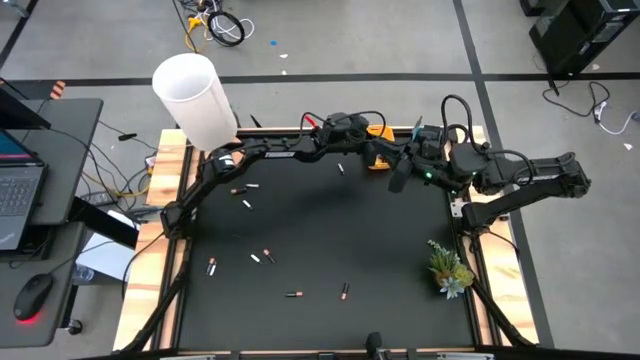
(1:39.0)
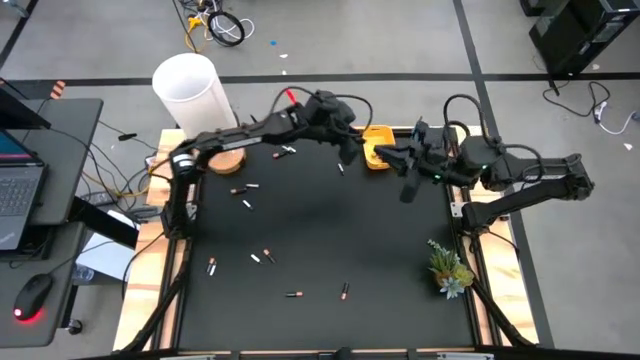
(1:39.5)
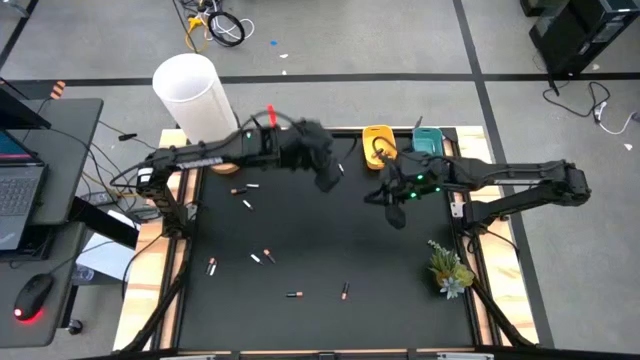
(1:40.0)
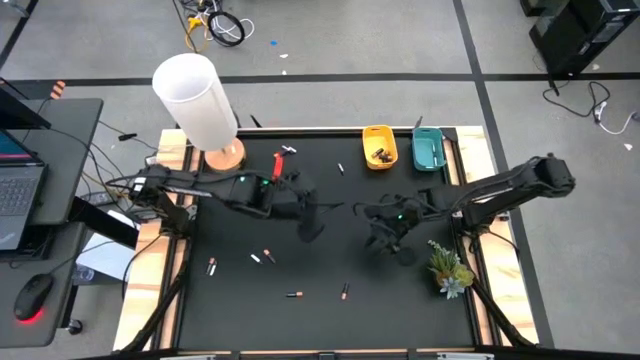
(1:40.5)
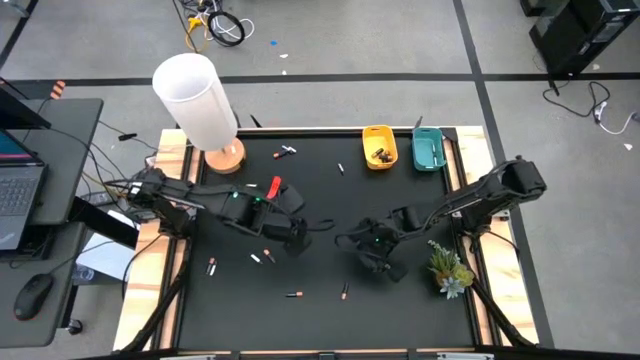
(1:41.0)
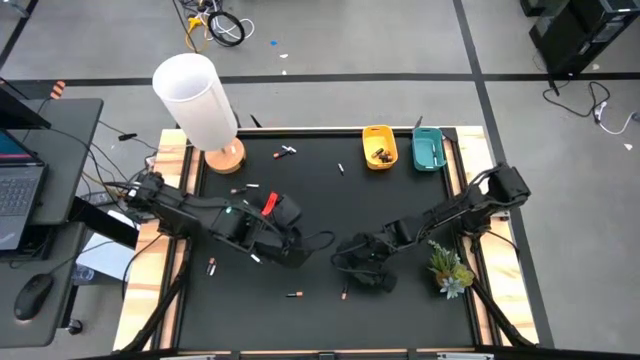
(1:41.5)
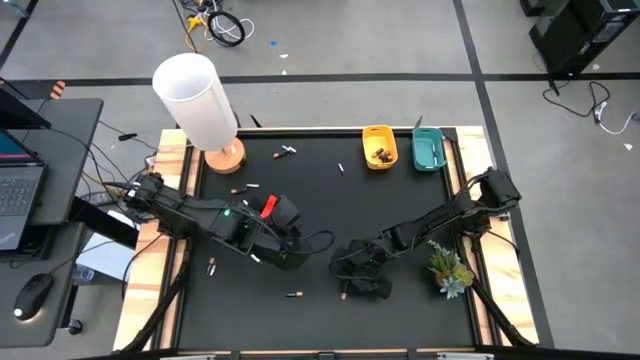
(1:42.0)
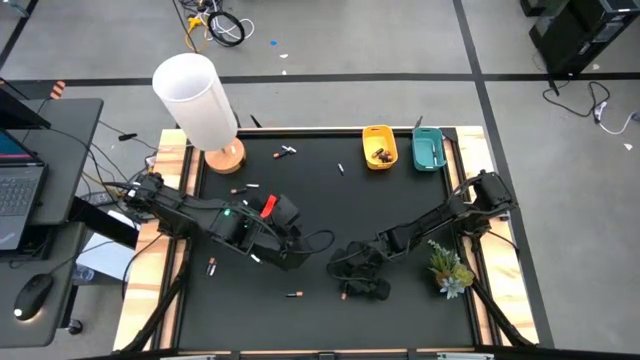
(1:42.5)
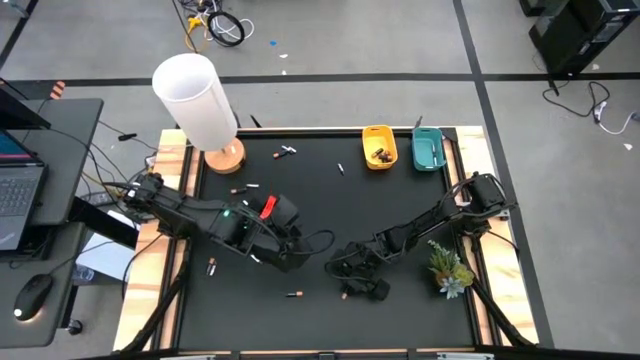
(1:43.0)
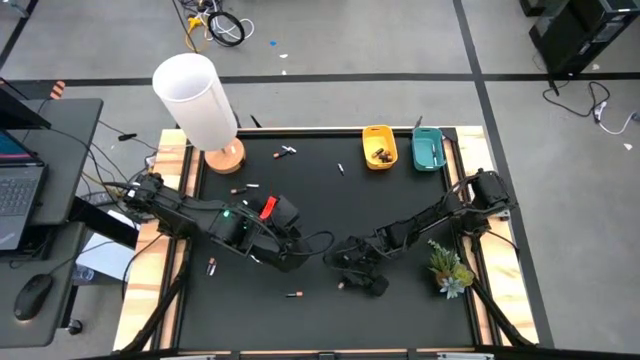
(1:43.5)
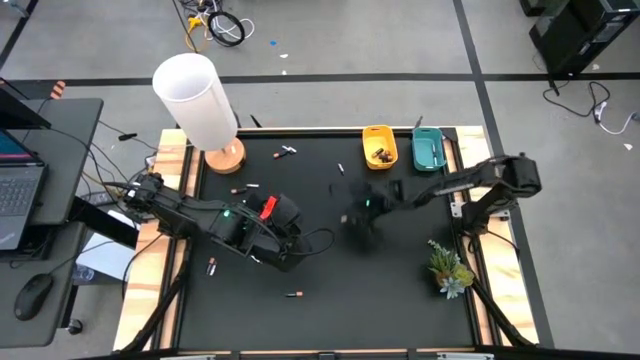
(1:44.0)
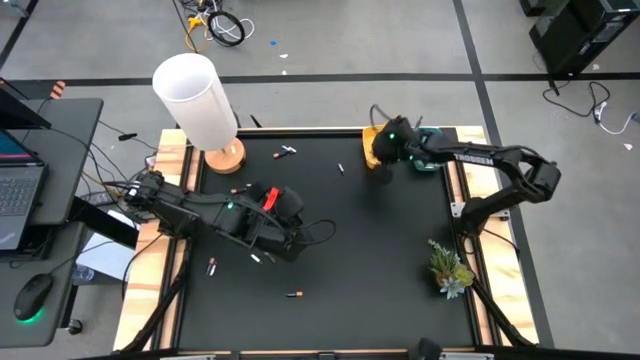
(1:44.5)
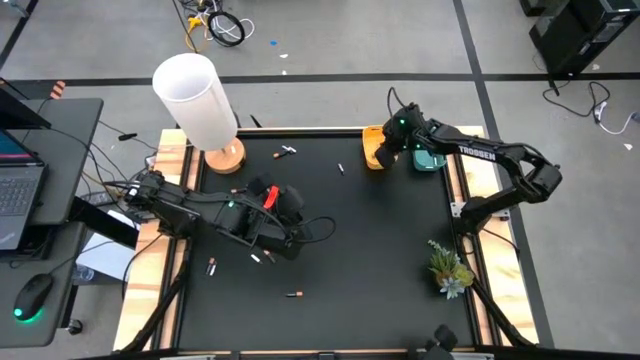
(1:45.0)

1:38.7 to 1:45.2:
Task: Sort batteries
Put the black battery into the yellow bin

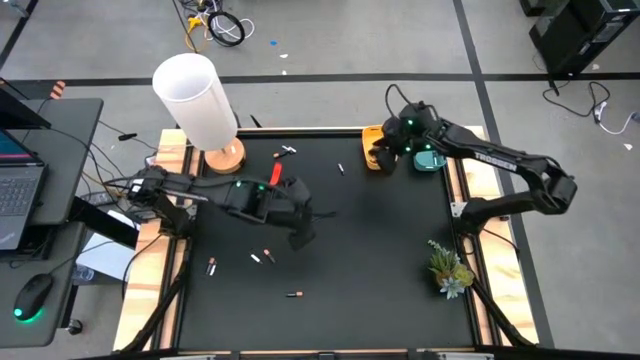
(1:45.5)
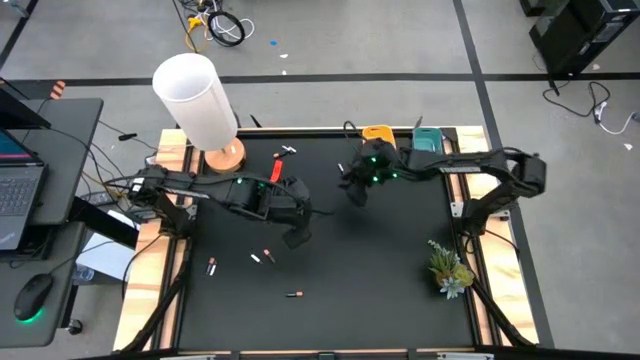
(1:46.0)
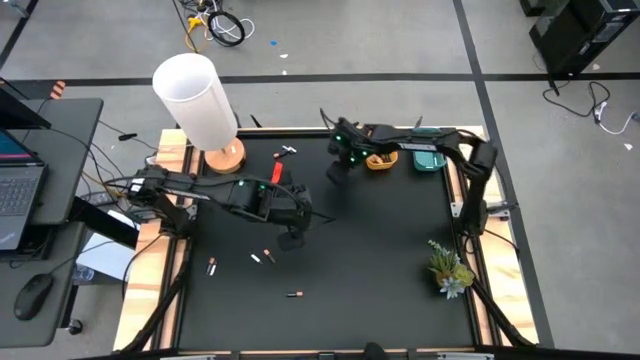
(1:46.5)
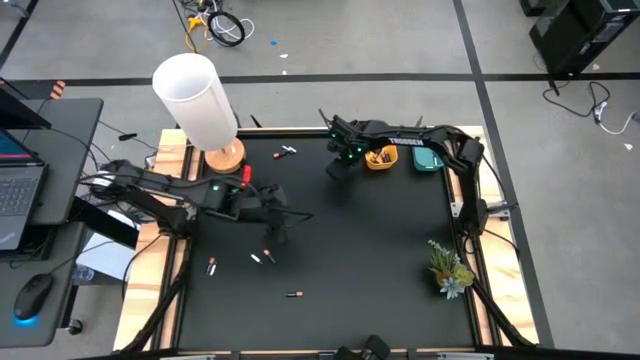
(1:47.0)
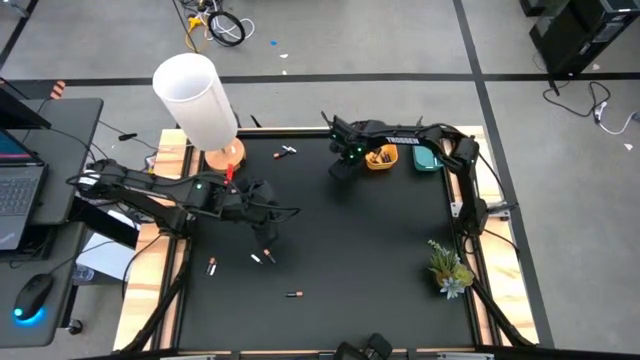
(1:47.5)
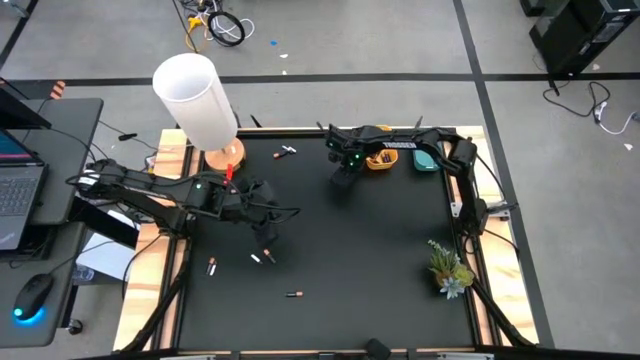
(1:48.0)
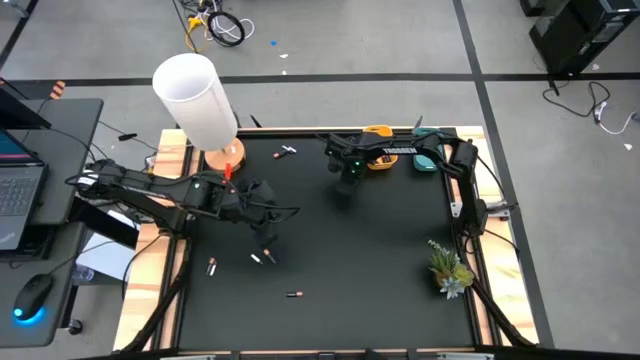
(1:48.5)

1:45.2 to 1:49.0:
Put the silver battery into the blue bin

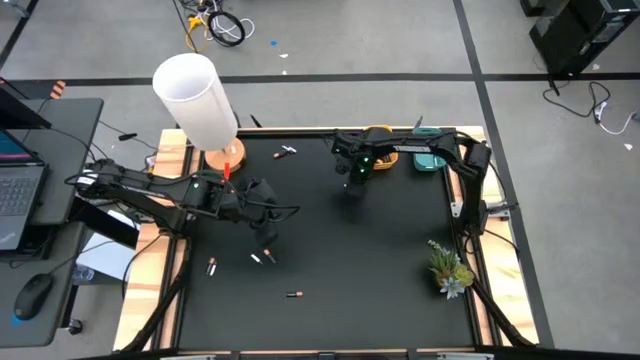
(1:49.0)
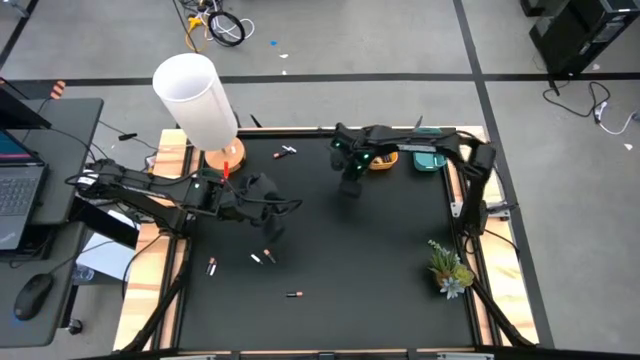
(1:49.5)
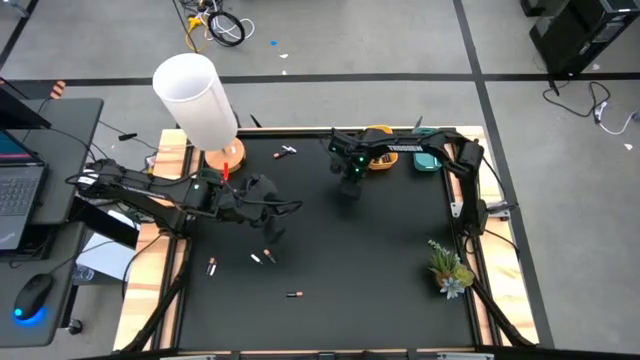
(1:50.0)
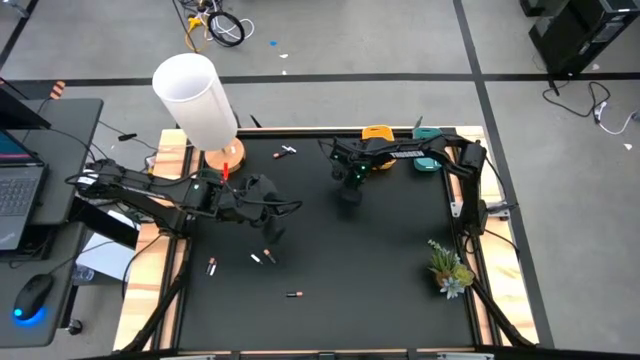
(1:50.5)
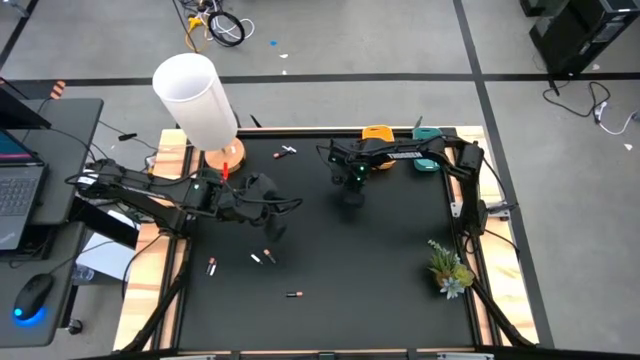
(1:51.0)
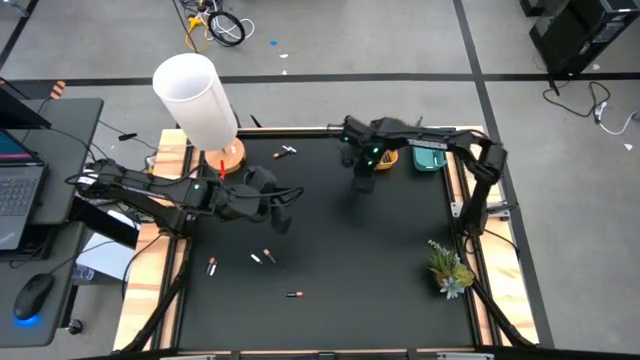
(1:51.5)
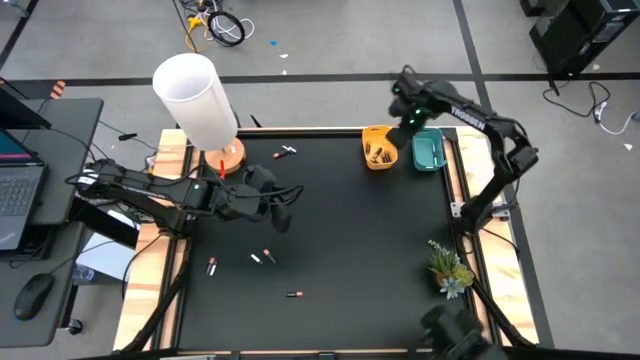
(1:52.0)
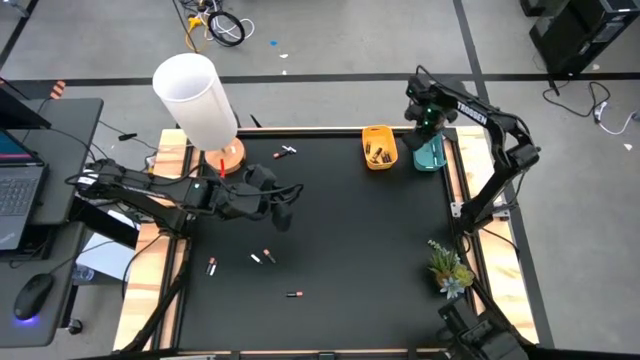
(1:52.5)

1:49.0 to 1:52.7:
Put the silver battery into the blue bin

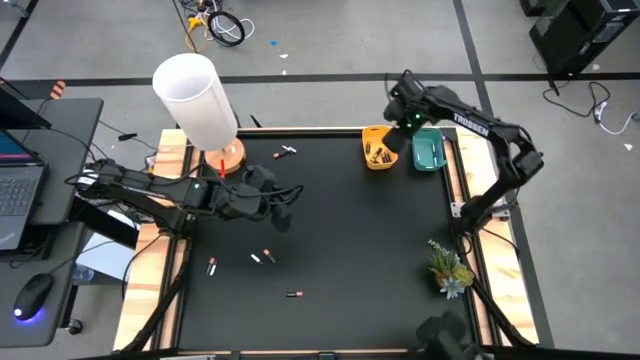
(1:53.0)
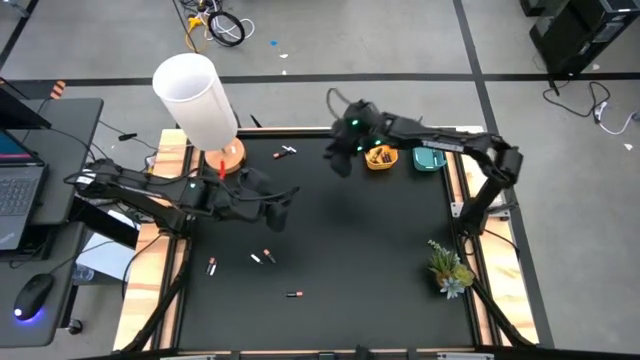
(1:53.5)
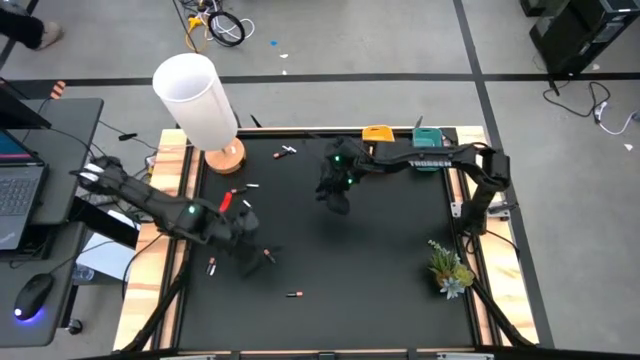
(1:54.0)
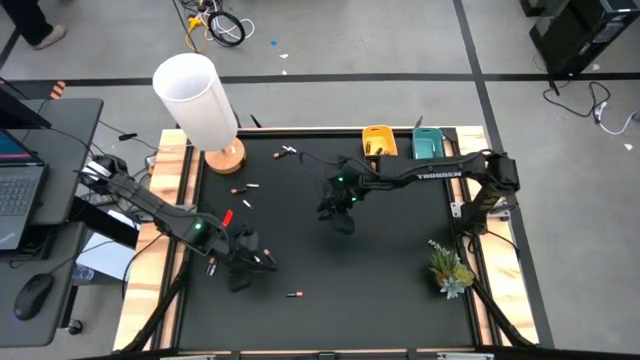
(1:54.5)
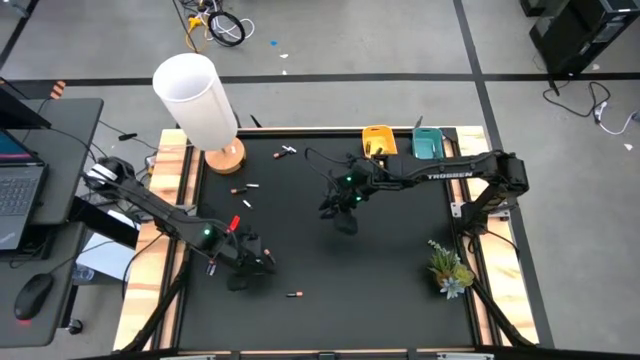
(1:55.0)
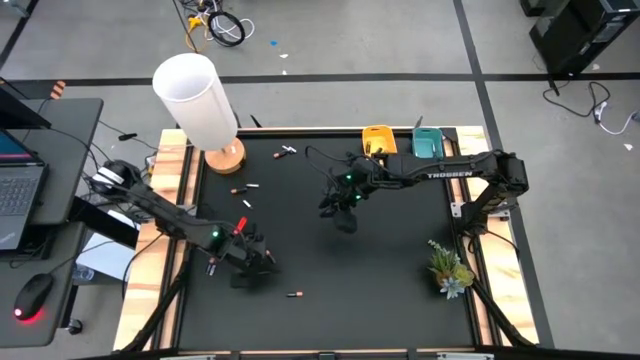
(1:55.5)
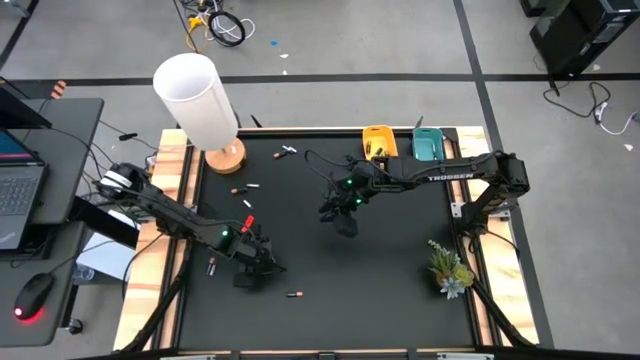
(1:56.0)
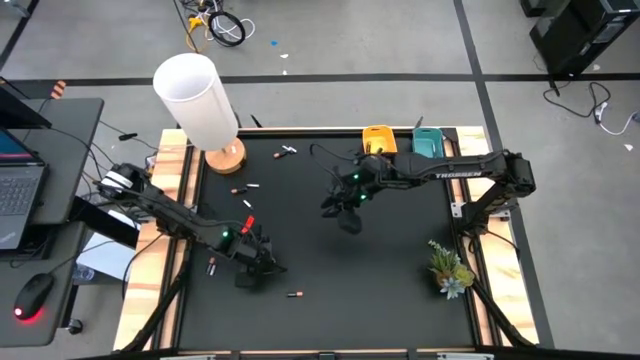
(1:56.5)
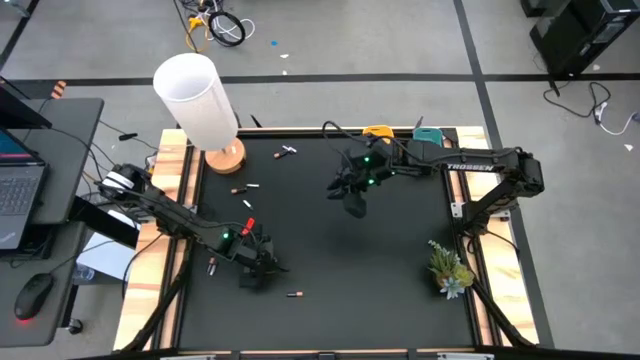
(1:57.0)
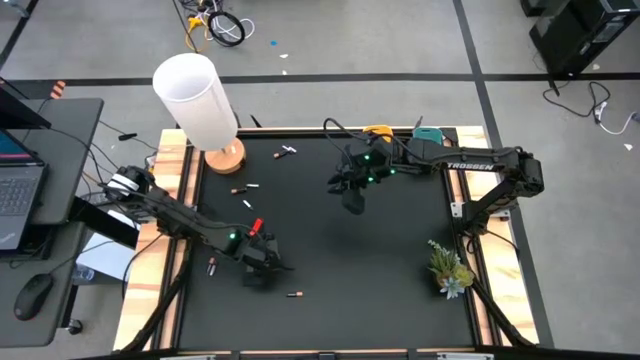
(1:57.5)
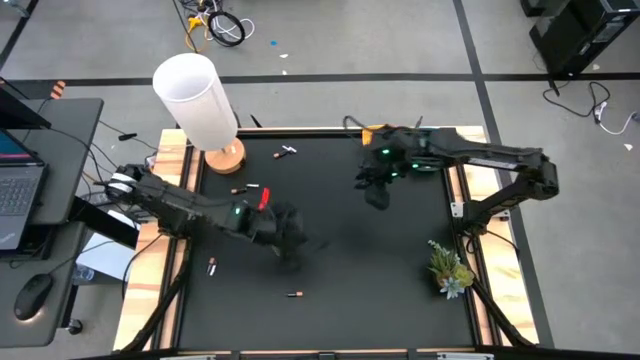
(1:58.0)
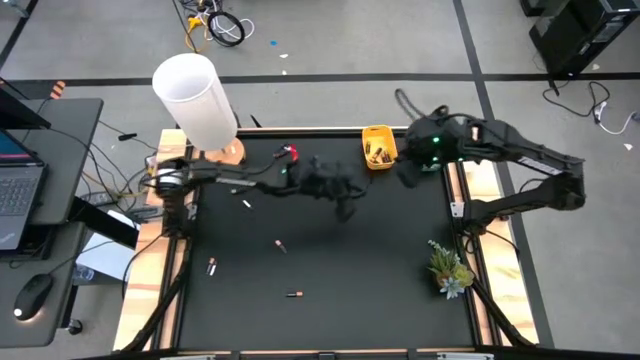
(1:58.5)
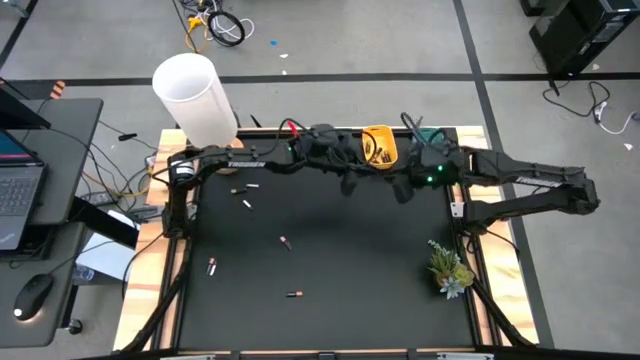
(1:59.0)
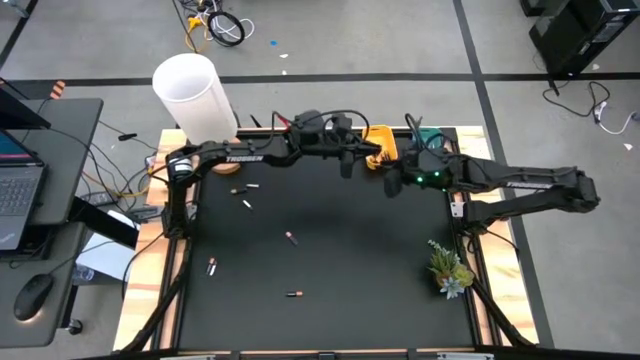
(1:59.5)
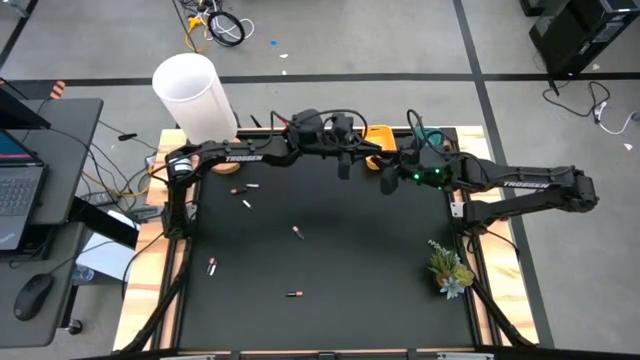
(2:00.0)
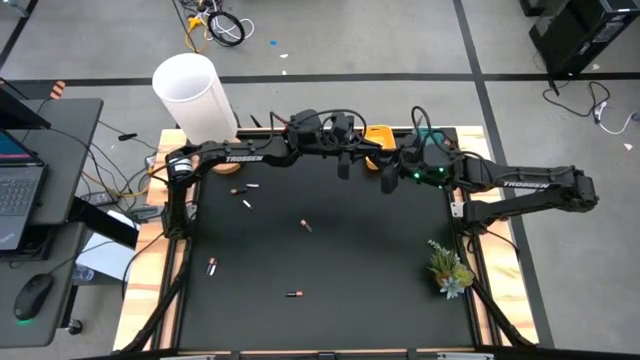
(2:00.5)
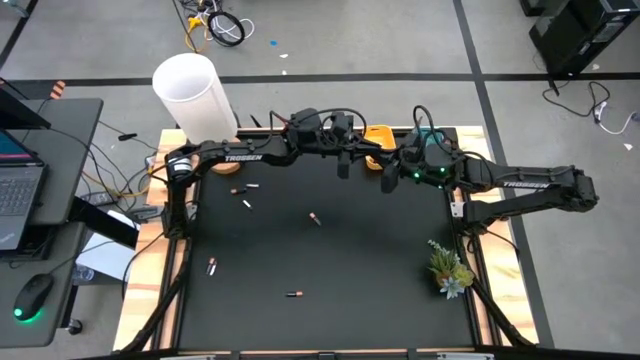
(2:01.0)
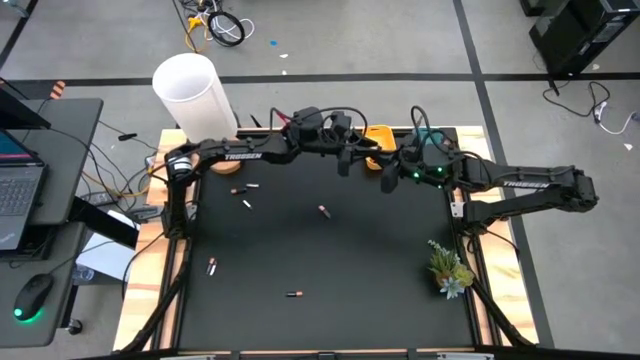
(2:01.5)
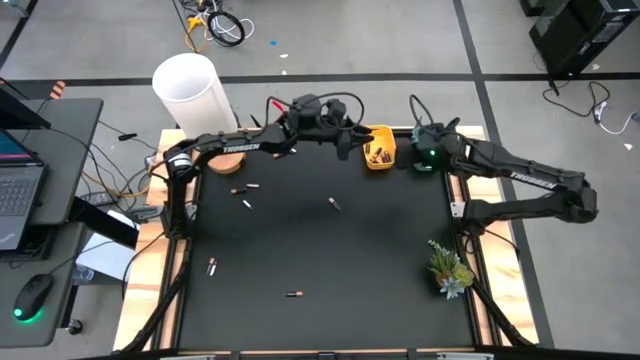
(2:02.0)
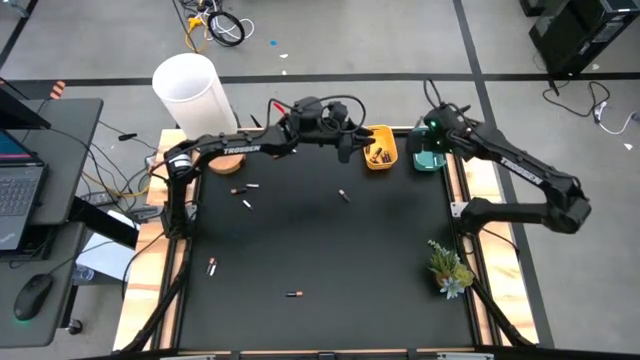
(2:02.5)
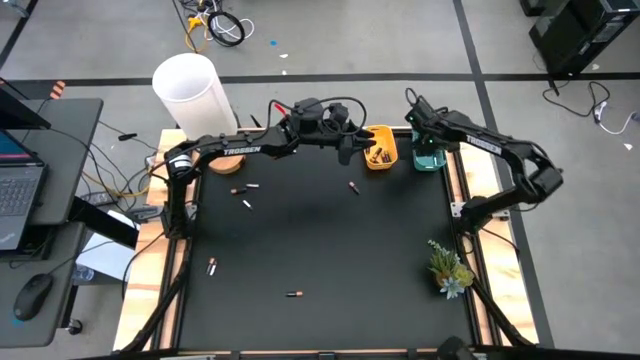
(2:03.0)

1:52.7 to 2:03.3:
Put the silver battery into the blue bin
